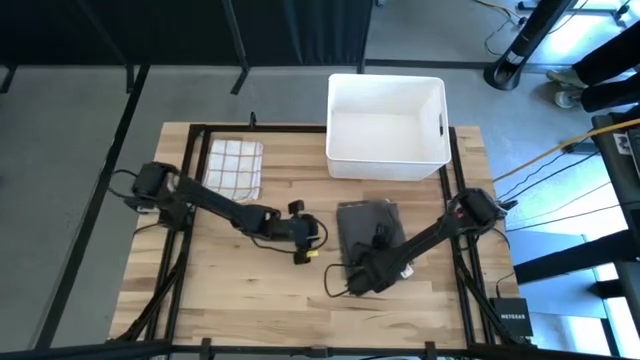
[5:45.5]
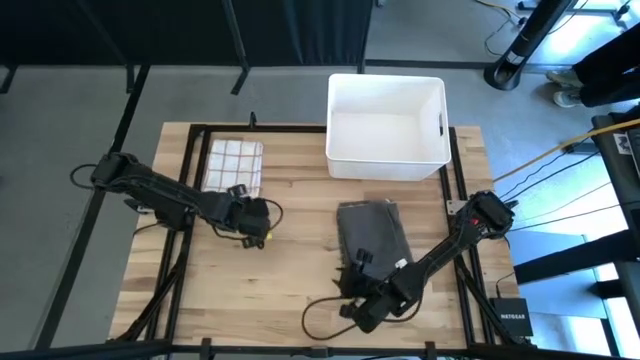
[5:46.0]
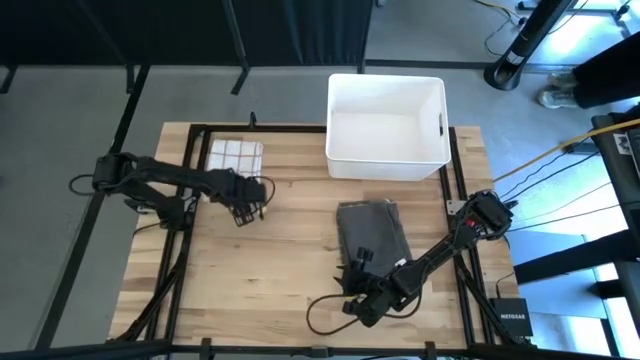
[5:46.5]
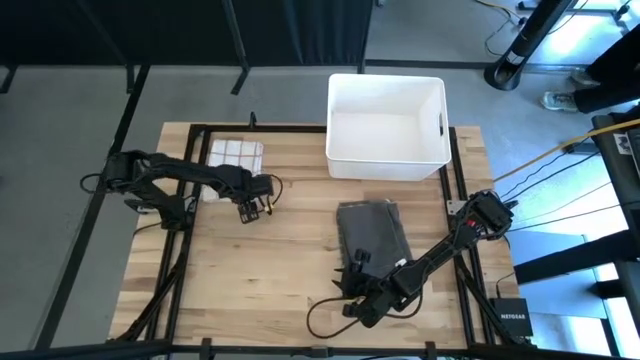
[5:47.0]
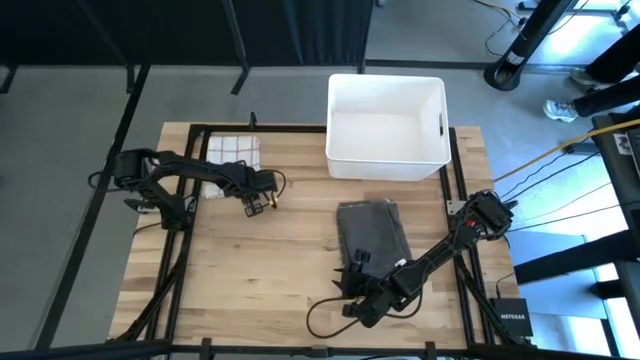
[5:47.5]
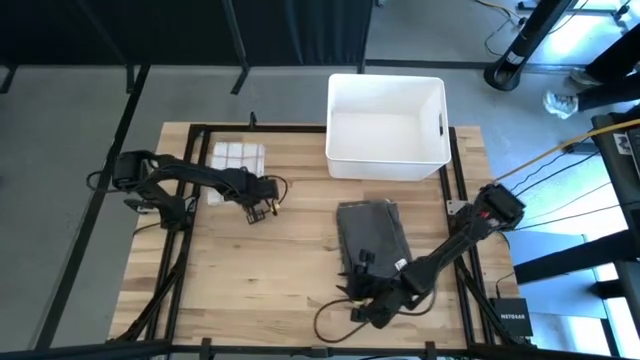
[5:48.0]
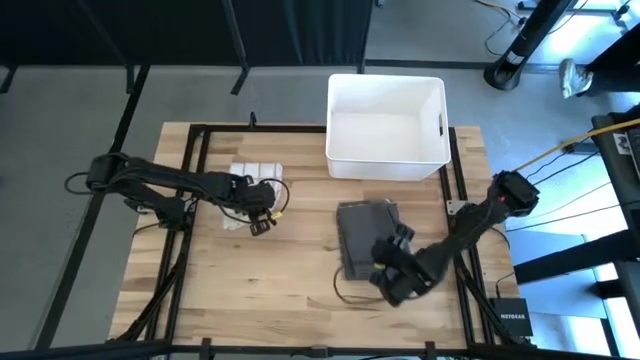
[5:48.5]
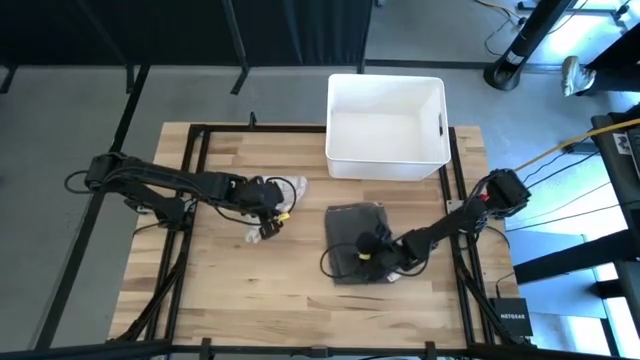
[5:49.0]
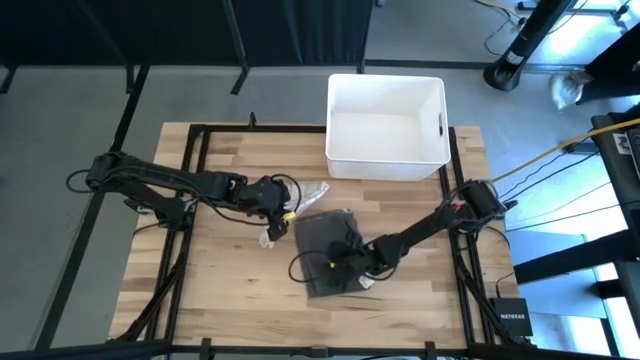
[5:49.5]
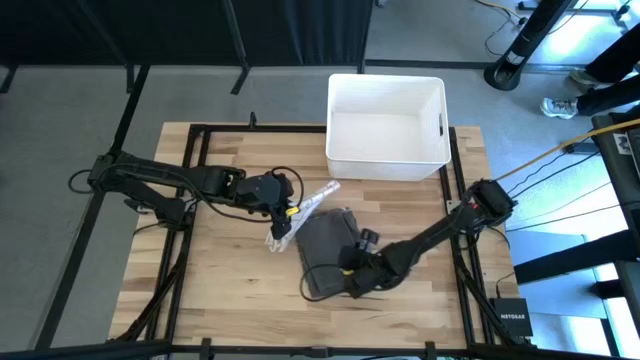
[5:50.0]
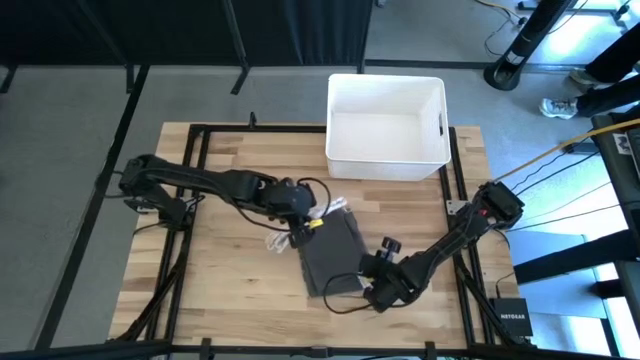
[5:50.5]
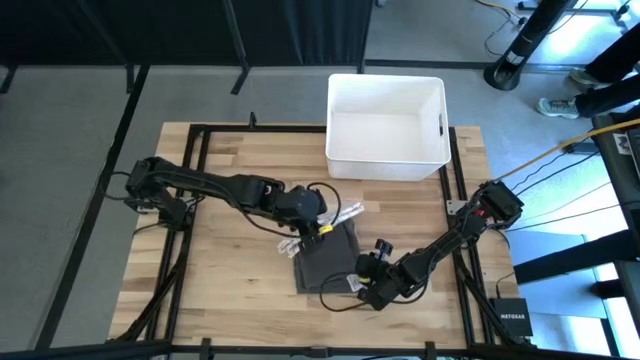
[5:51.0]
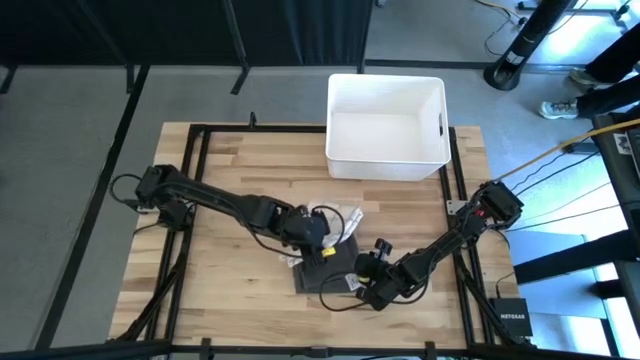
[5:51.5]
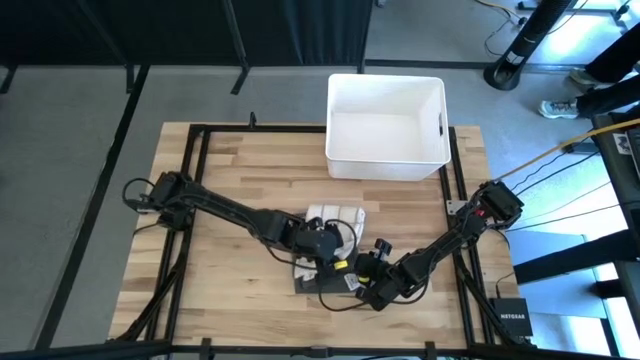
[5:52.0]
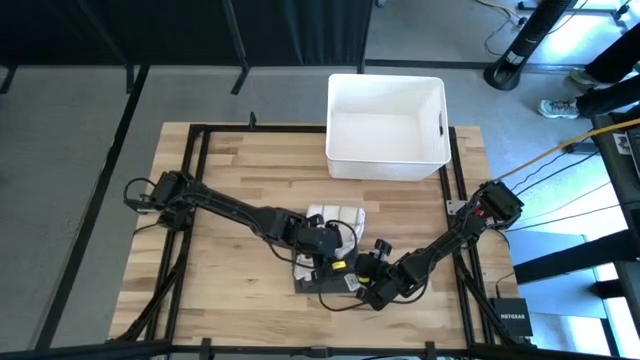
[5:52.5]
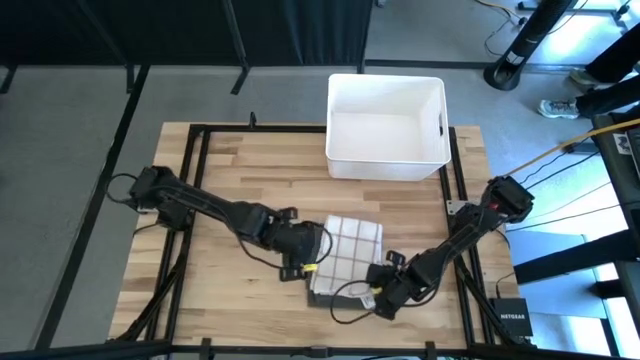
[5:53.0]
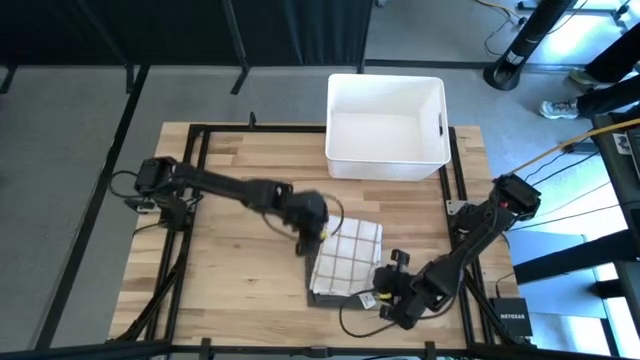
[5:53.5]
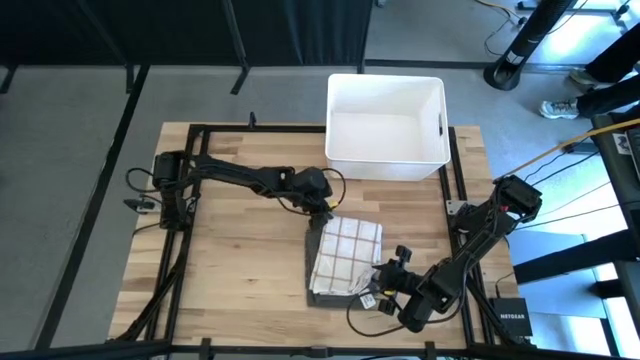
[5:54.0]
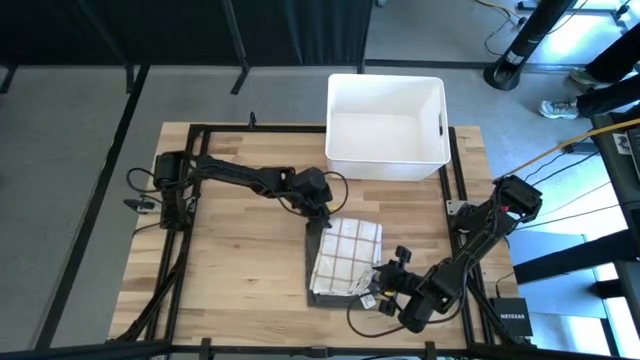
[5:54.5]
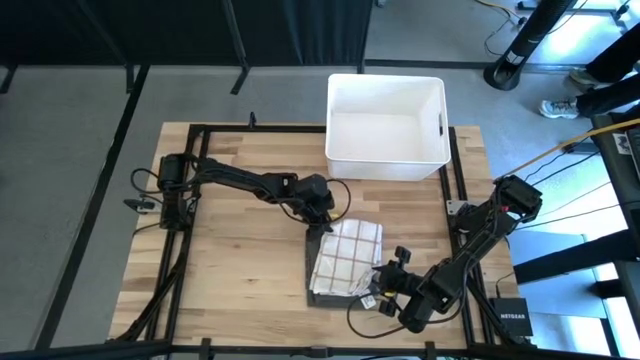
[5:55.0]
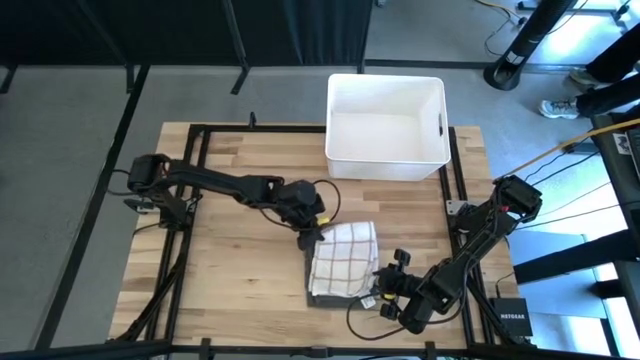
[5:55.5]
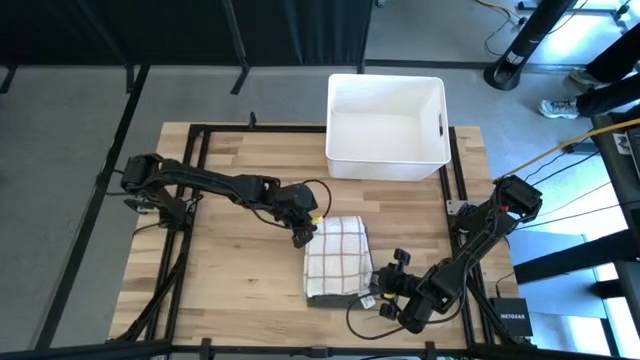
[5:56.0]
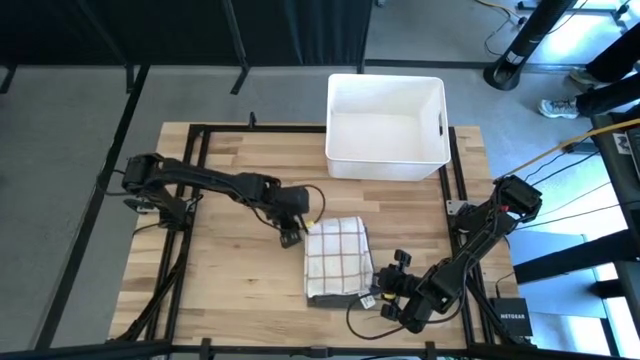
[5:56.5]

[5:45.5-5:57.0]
Task: Fold towel
Stack the white towel on top of the gray towel

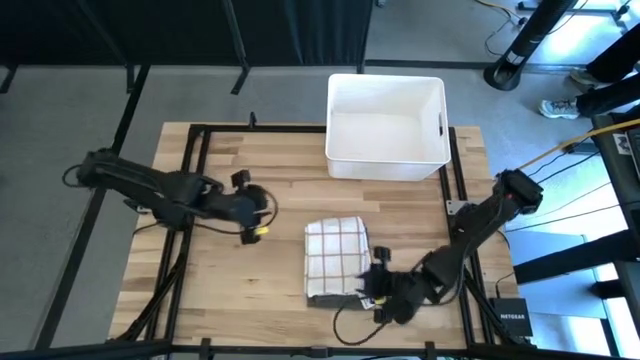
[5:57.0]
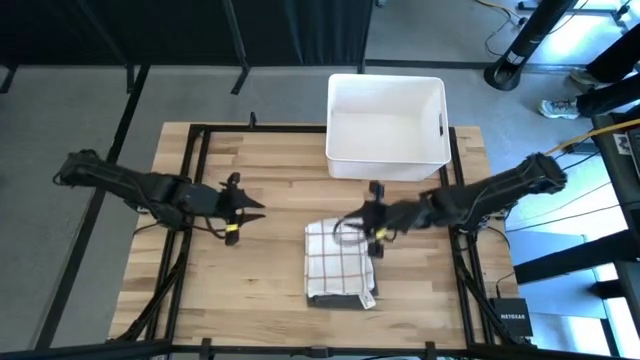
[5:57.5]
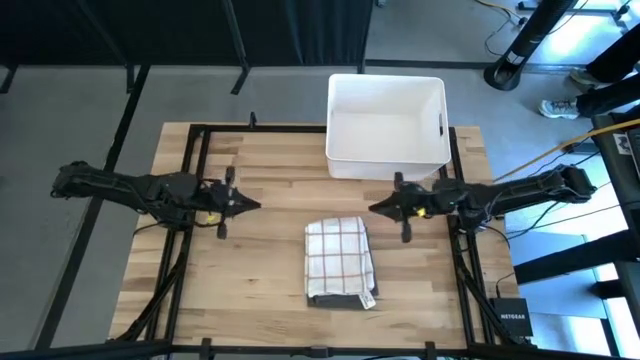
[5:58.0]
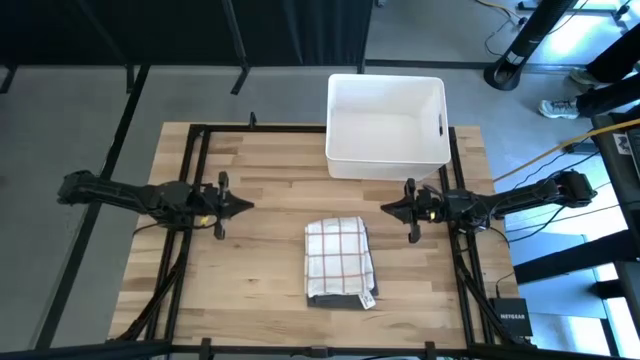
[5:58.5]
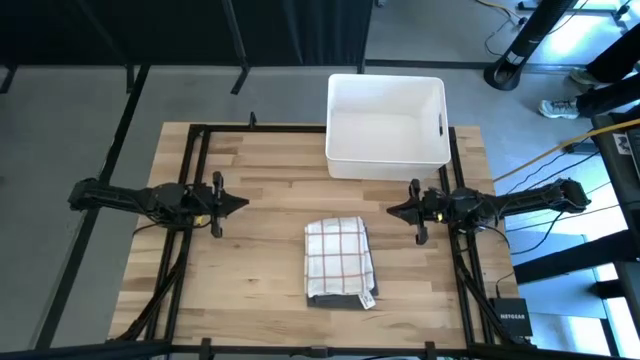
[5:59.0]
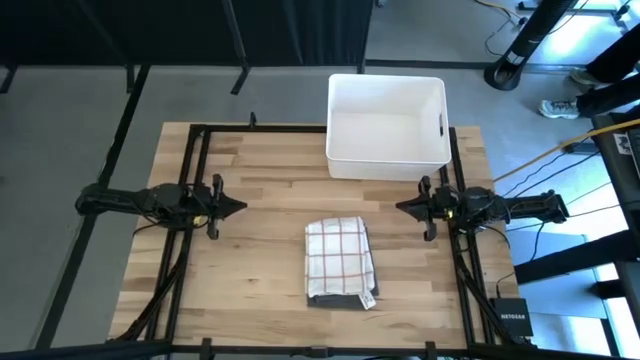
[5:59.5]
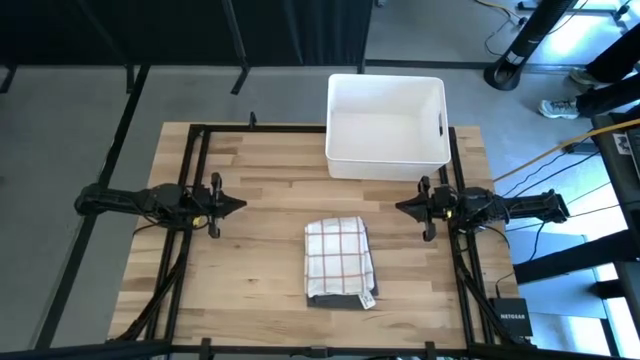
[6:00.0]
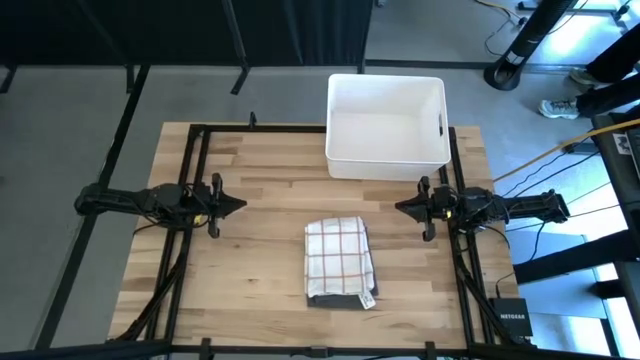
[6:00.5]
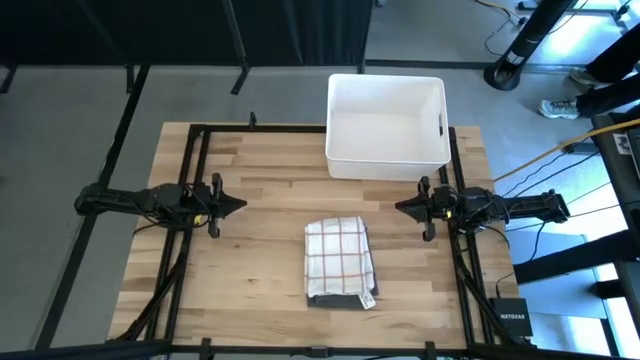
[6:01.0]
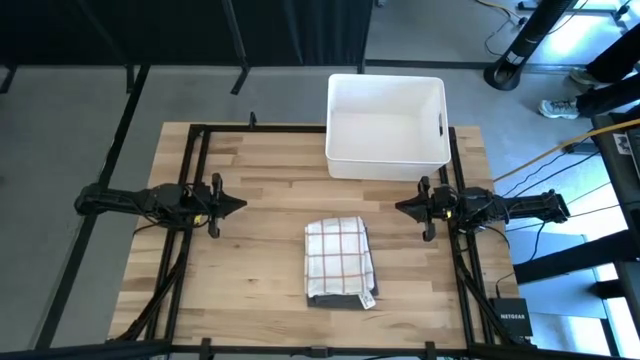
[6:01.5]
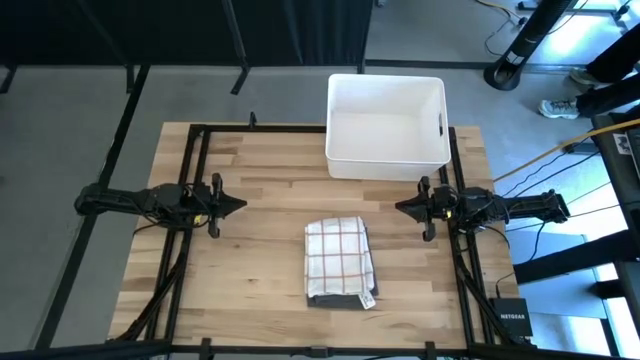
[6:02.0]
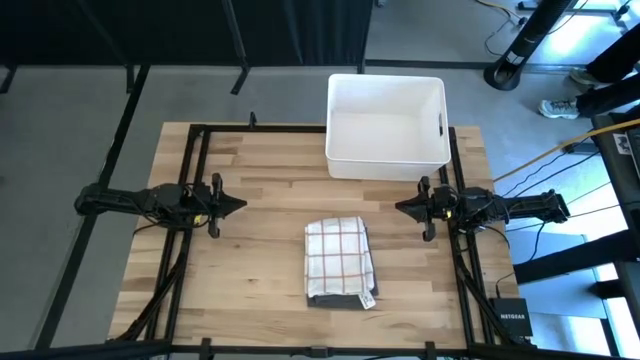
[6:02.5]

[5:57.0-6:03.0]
Return to Home Position

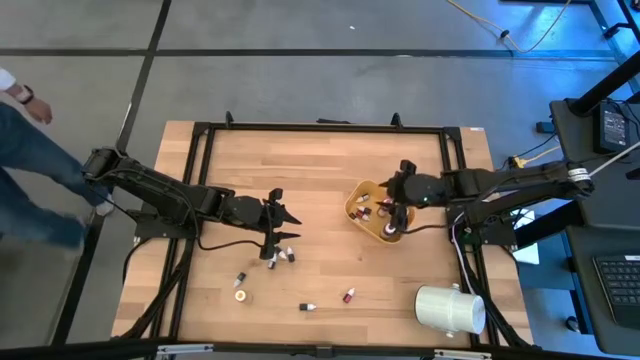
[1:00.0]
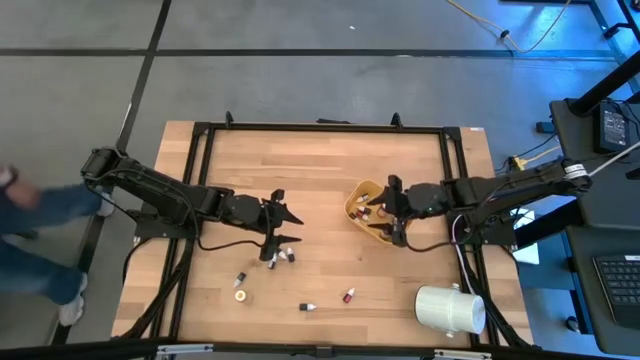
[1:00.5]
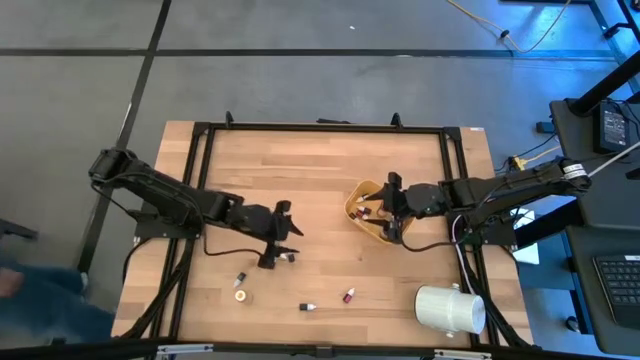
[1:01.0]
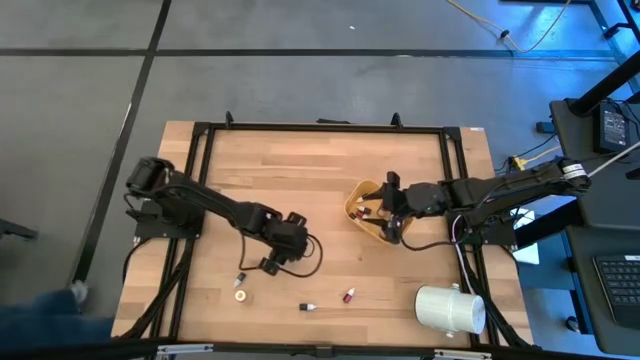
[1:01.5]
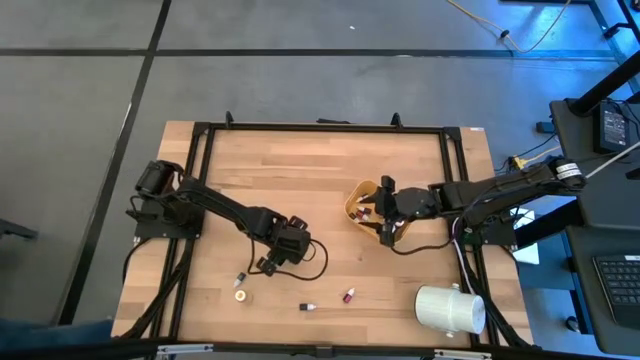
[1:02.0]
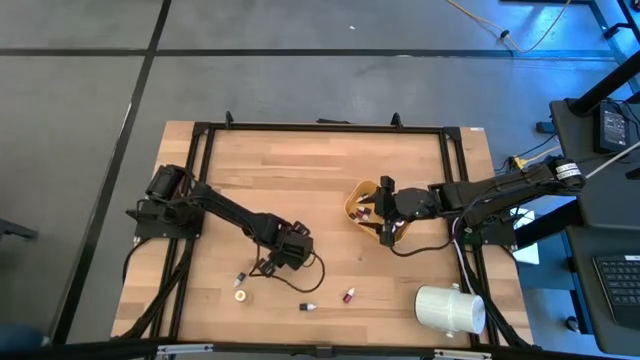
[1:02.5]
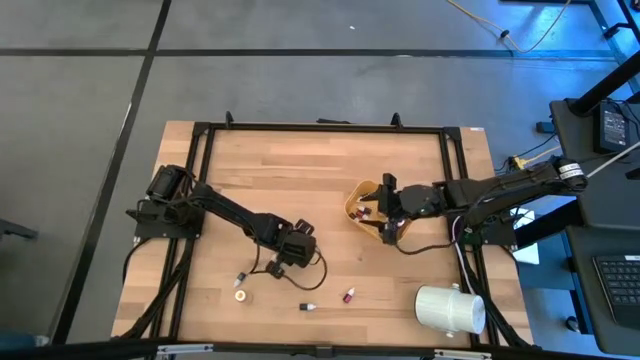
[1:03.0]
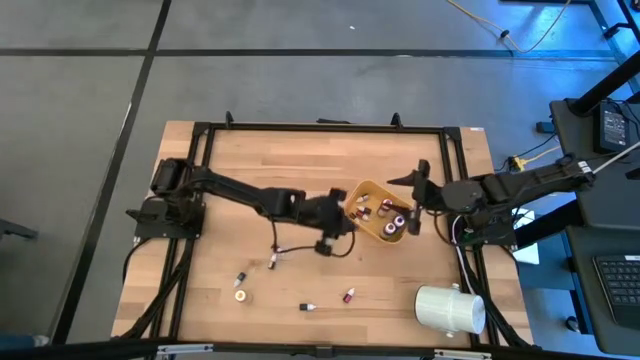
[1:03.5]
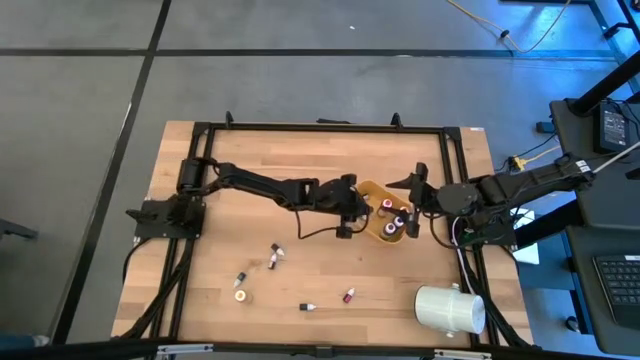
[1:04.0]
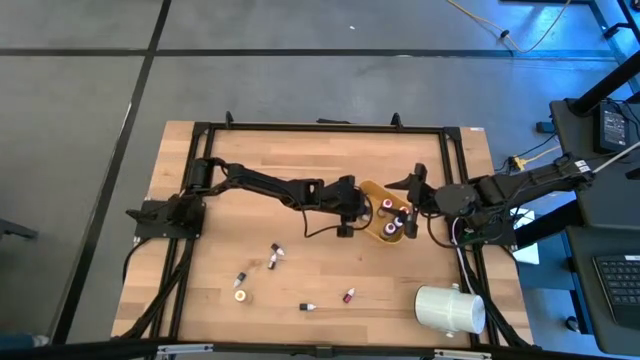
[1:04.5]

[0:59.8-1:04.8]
Task: Pick & Place food coloring
Put the small red food coloring bottle in the yellow bin
